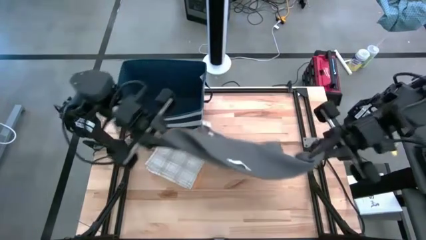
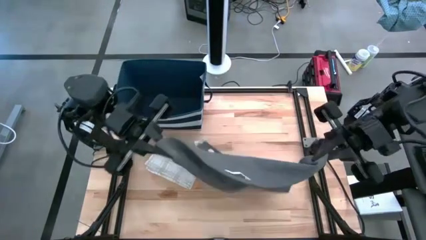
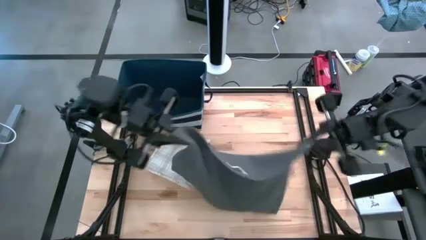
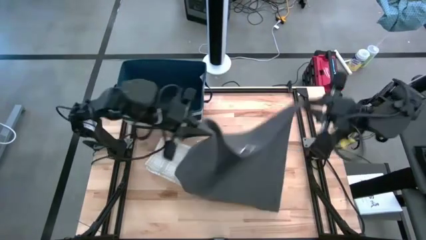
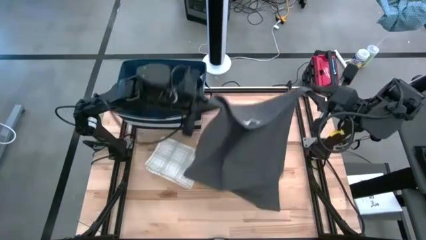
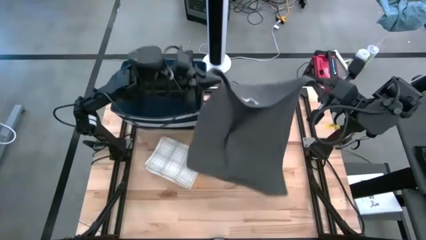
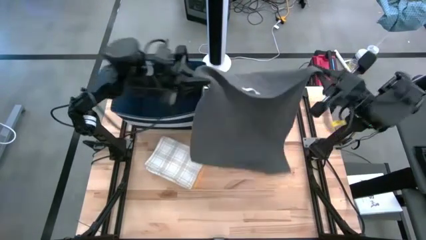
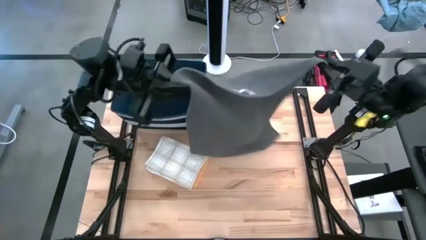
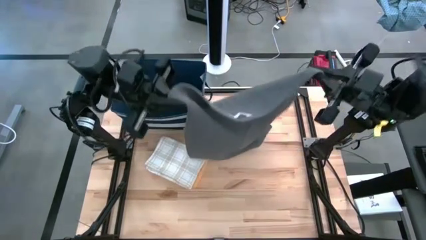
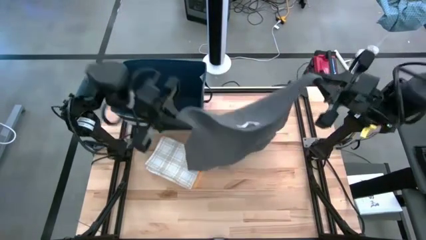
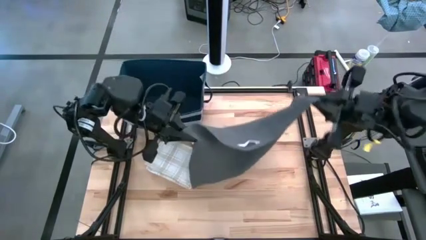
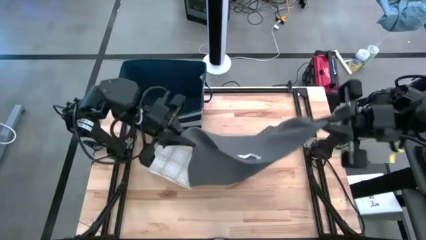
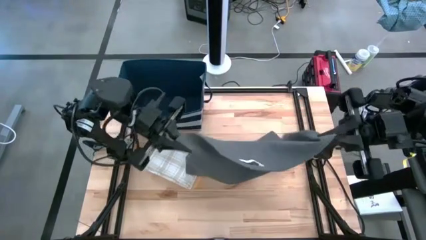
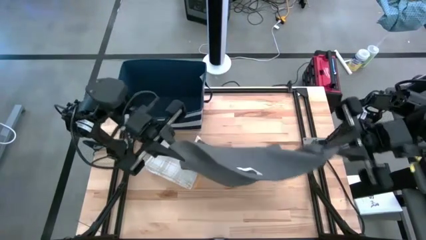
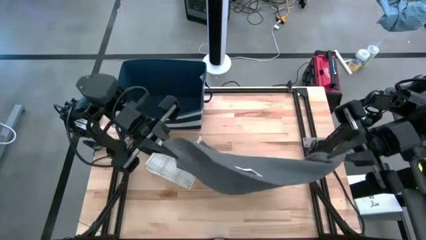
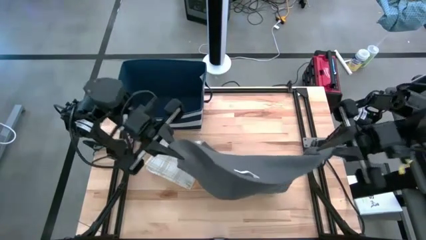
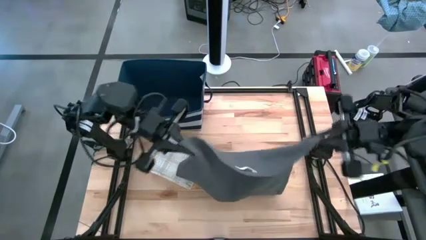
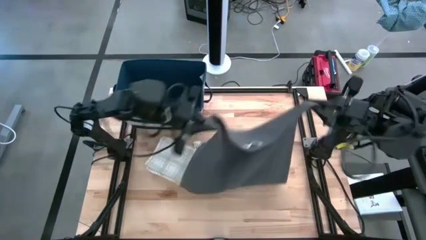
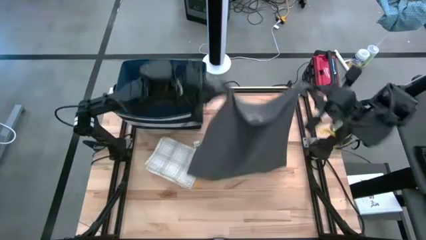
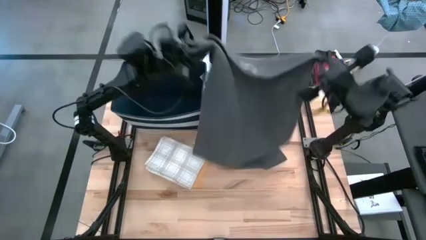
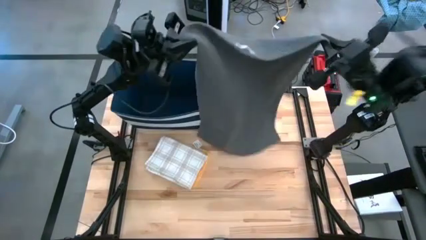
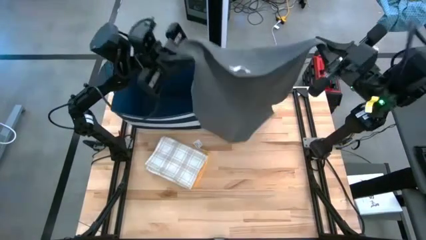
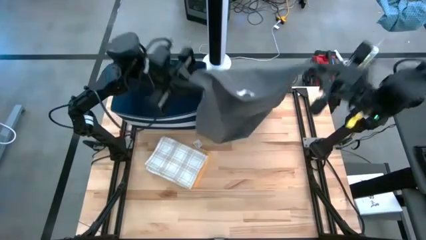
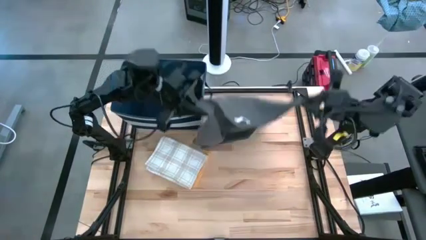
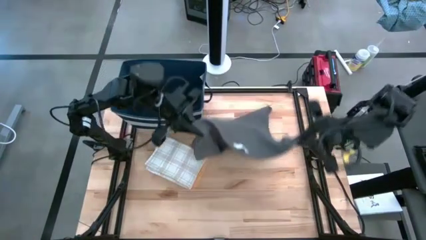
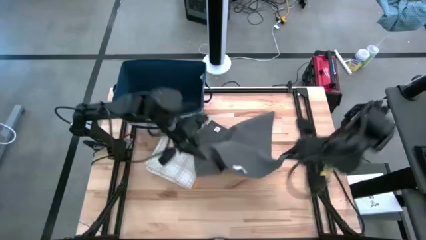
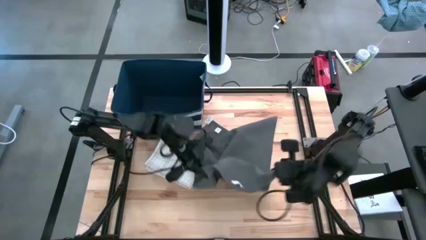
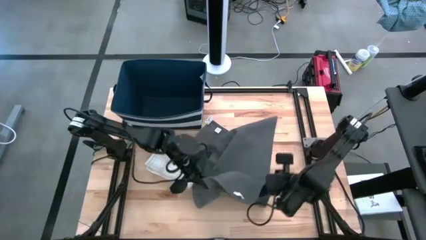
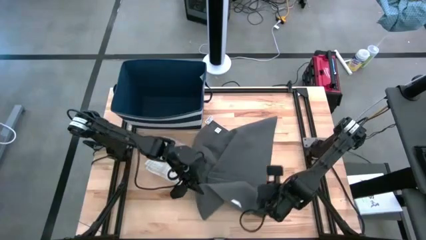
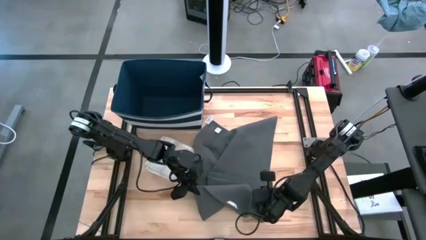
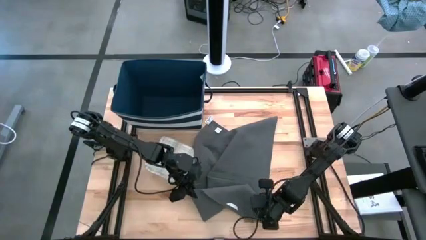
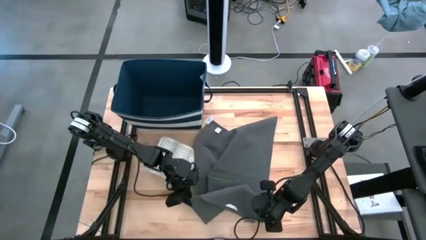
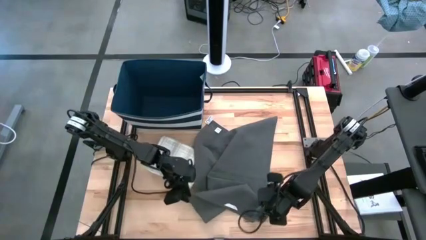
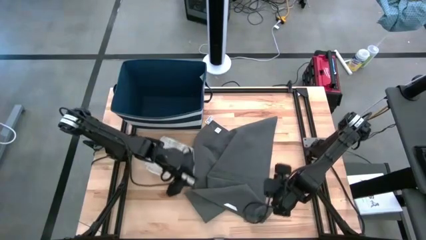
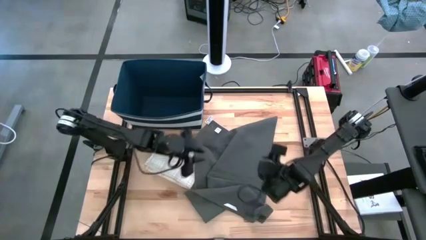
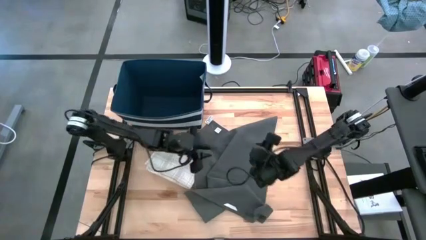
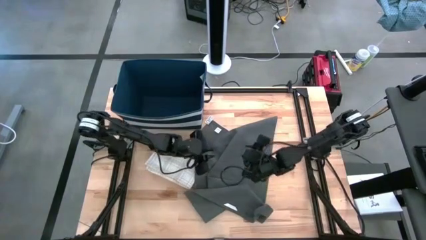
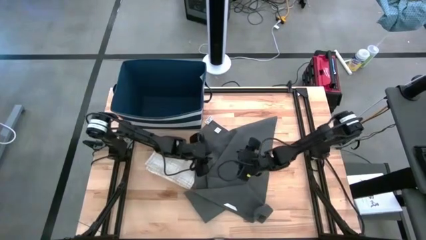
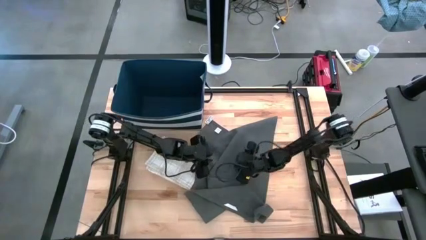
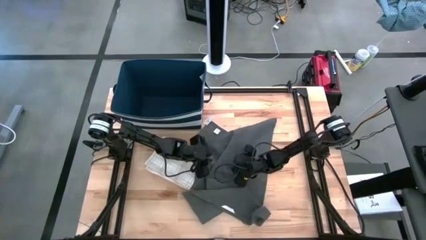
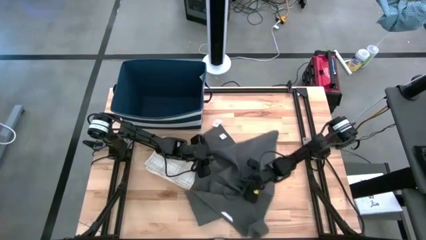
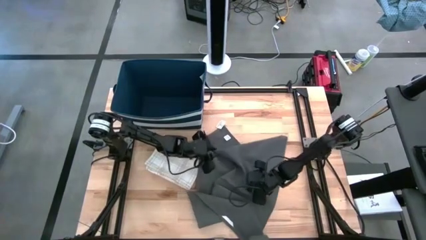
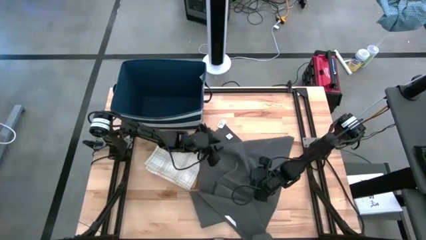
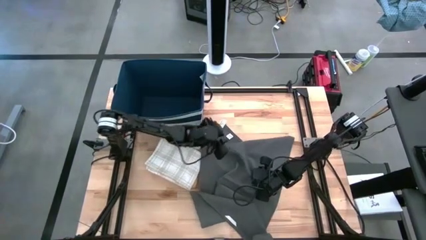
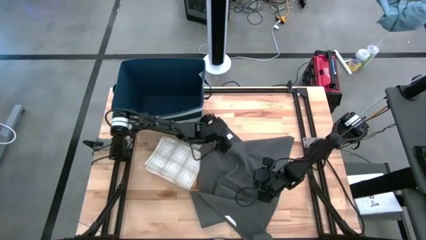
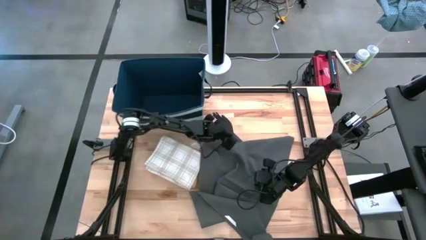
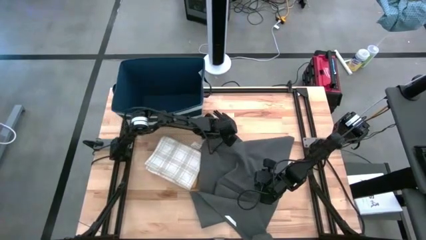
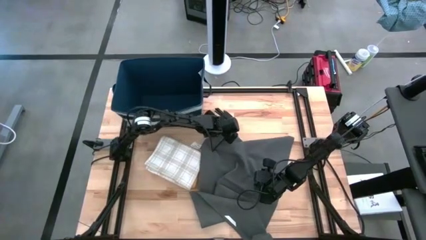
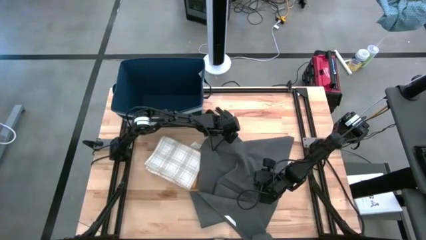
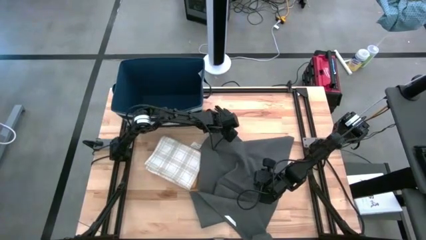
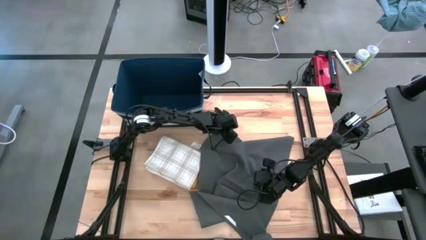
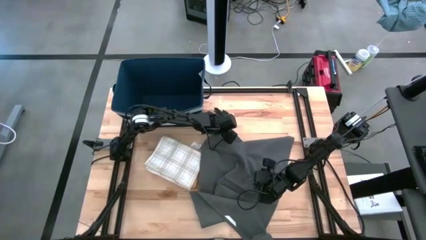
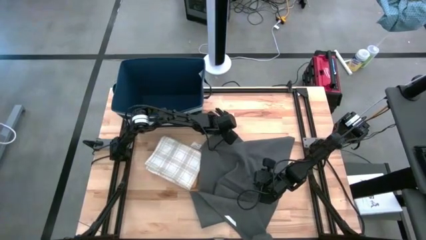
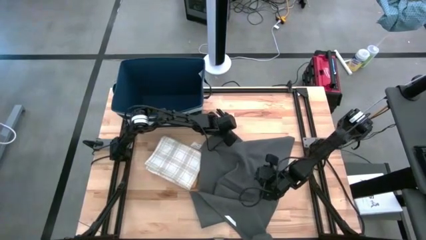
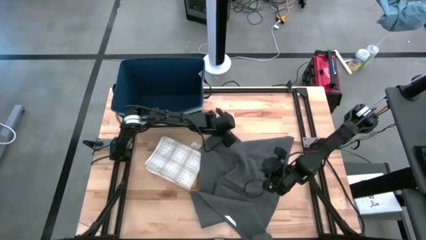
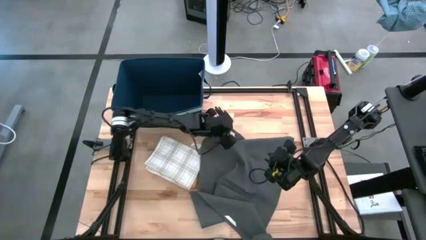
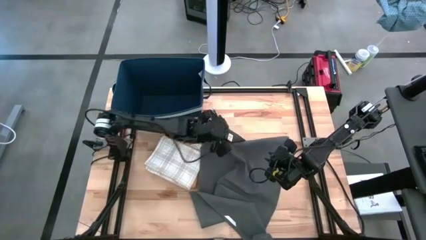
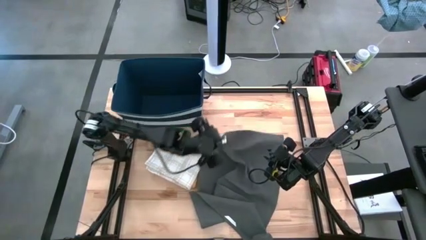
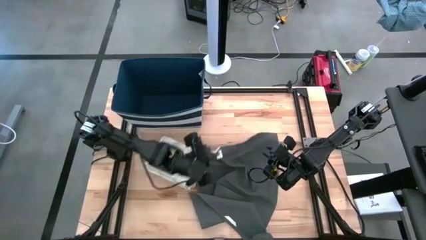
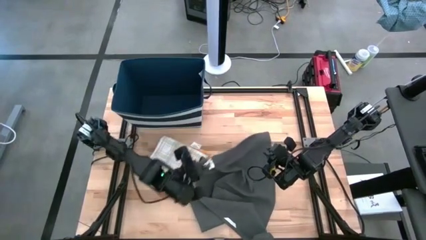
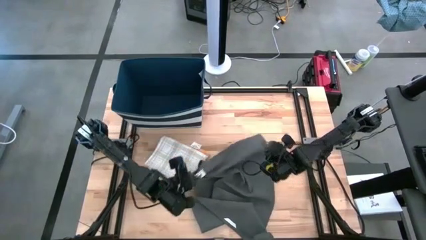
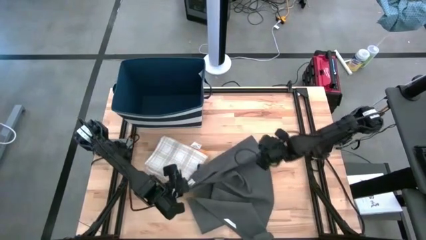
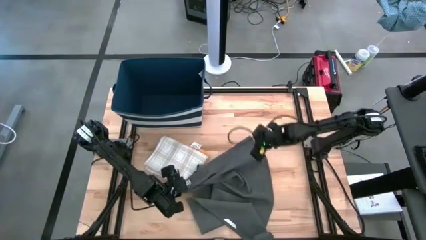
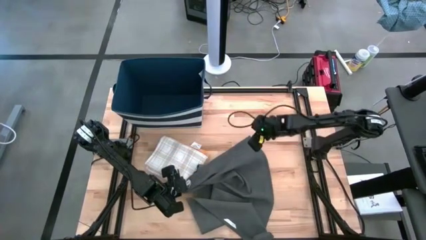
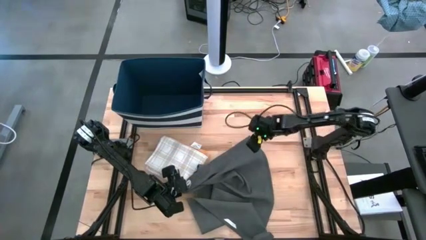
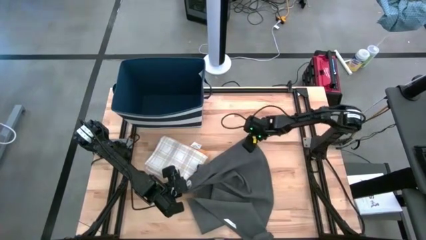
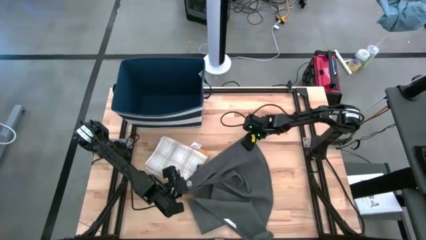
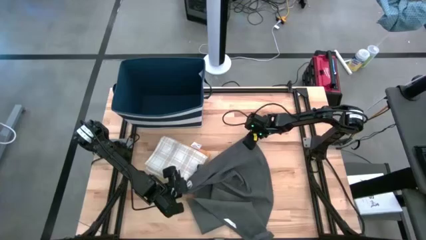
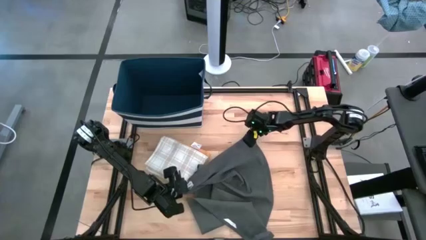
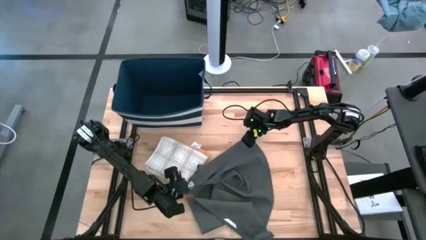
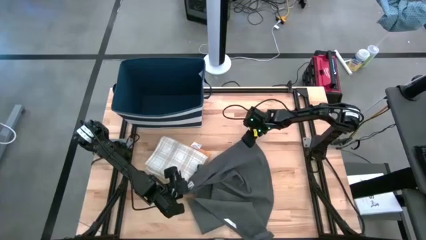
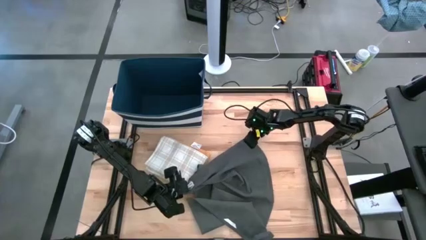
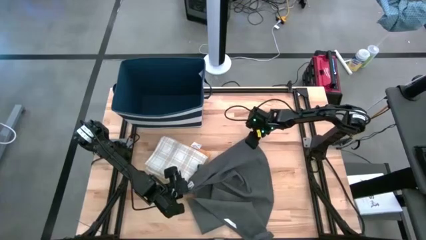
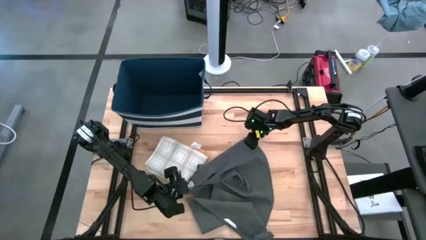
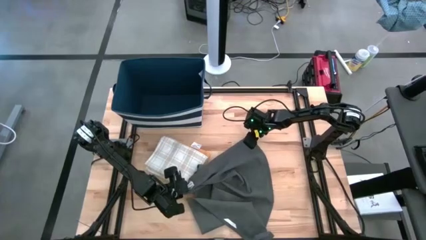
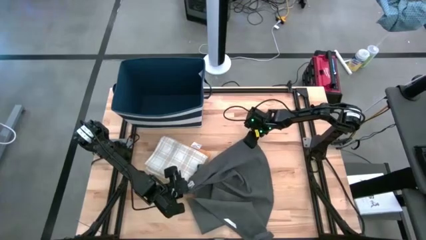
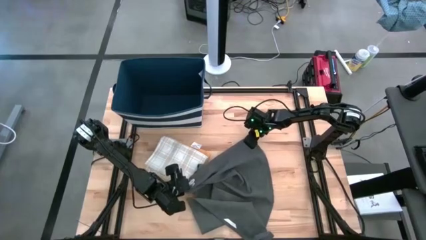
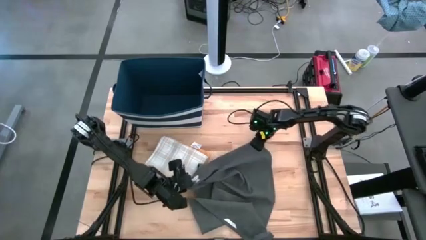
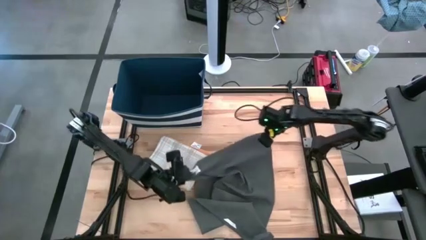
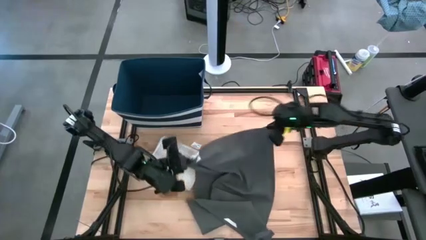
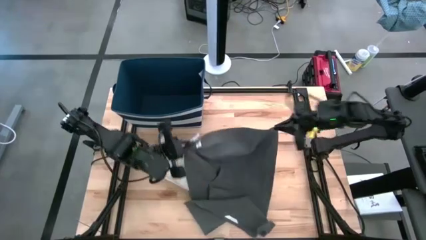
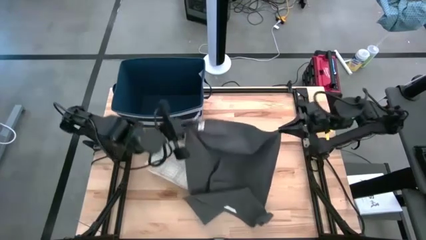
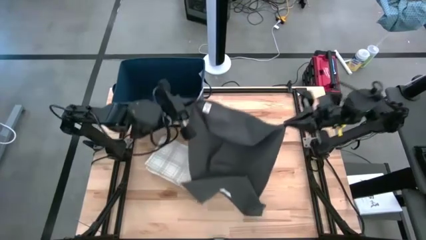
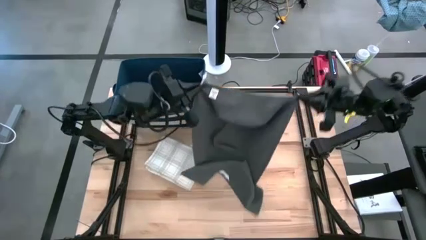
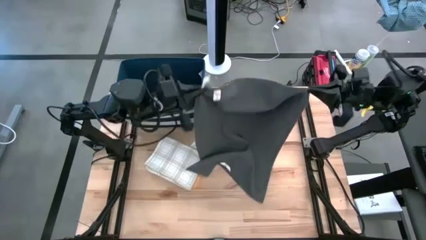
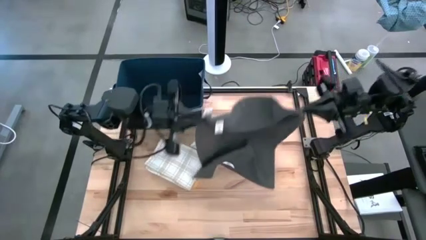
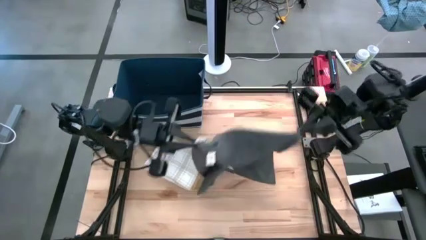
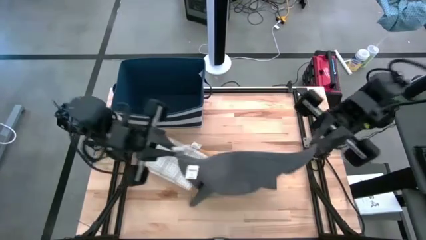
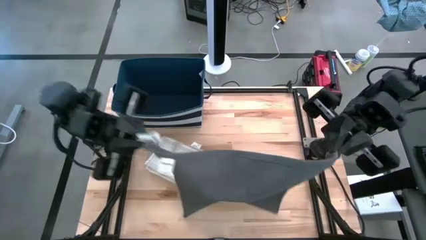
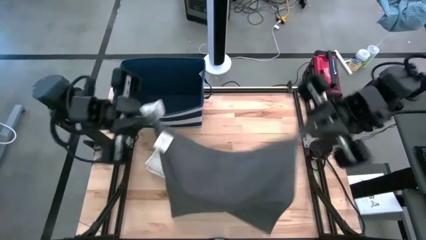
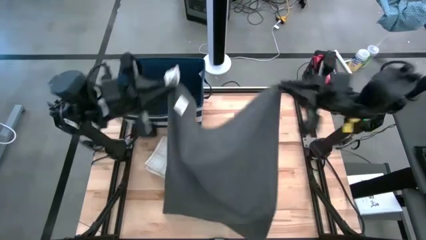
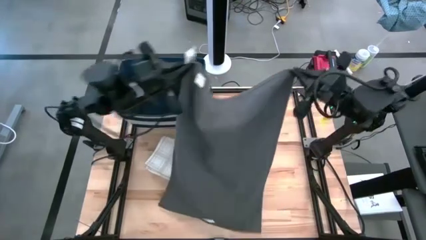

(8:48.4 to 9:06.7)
Task: Fold towel
Fold the gray kitchen towel
